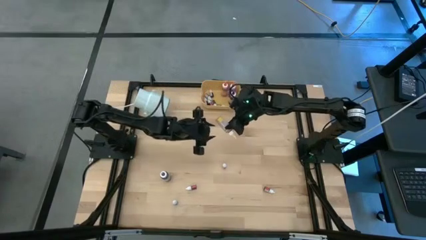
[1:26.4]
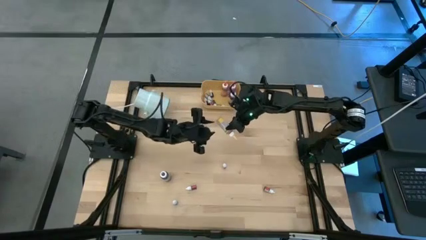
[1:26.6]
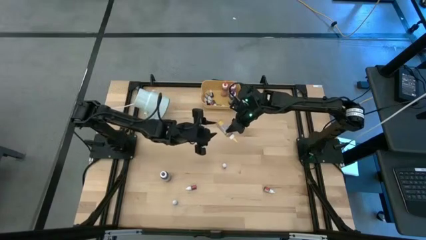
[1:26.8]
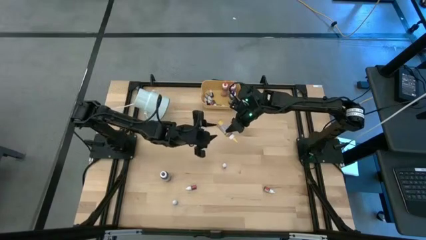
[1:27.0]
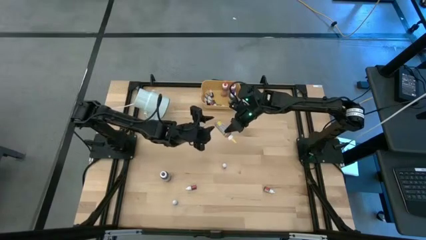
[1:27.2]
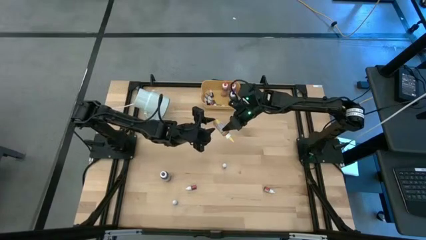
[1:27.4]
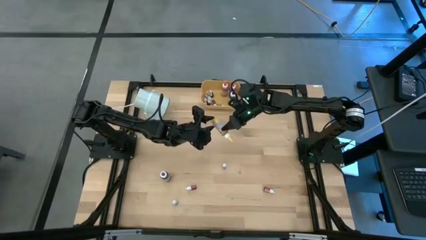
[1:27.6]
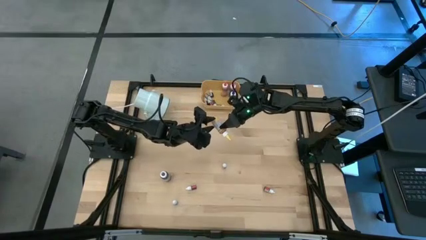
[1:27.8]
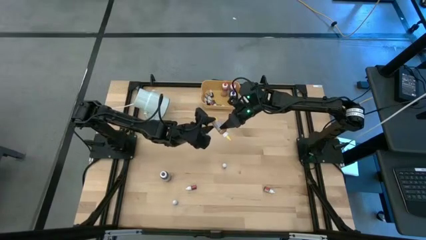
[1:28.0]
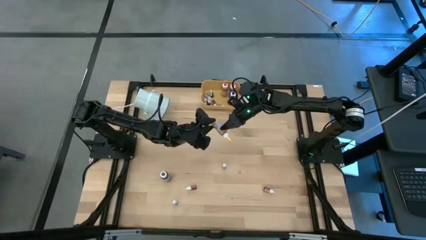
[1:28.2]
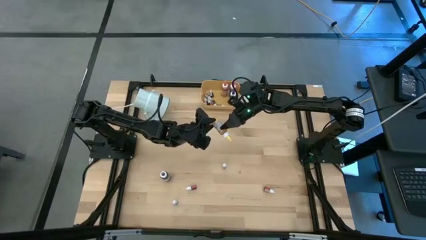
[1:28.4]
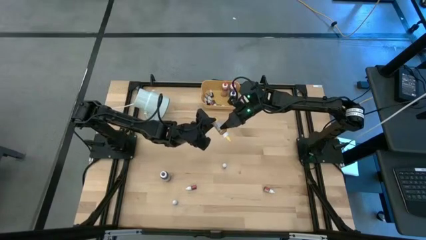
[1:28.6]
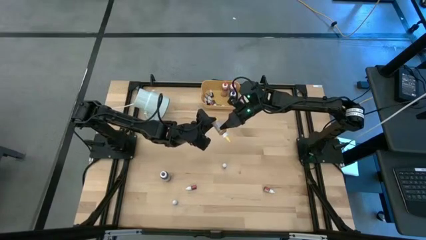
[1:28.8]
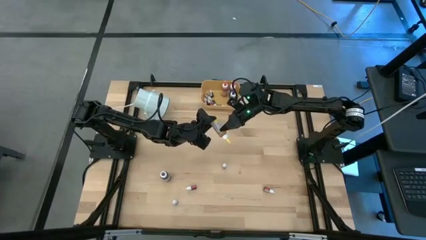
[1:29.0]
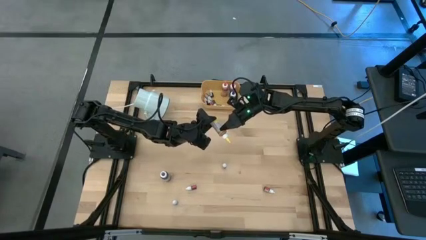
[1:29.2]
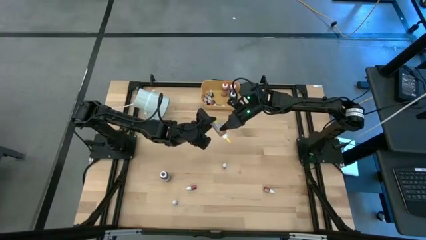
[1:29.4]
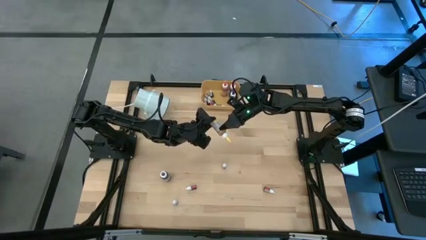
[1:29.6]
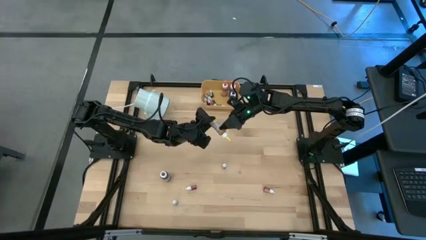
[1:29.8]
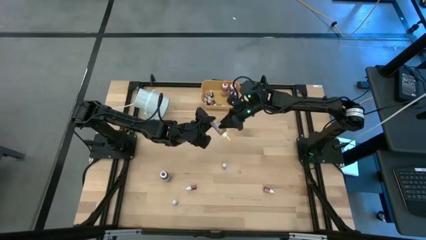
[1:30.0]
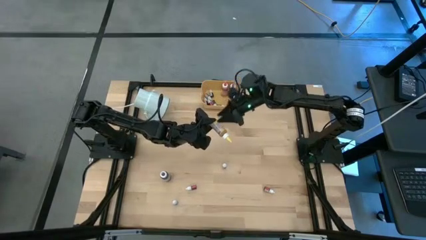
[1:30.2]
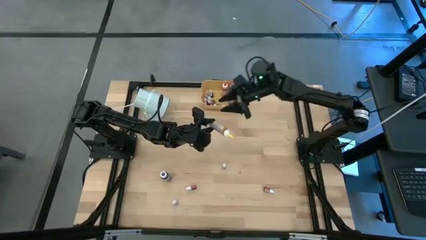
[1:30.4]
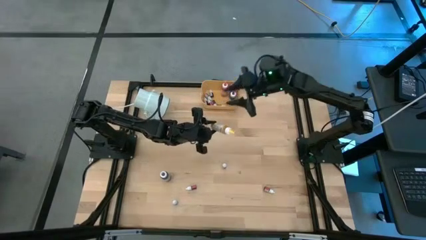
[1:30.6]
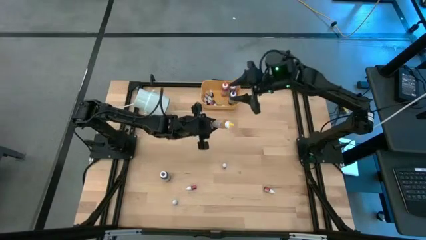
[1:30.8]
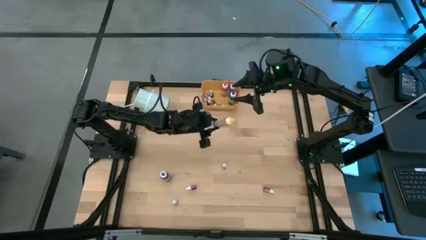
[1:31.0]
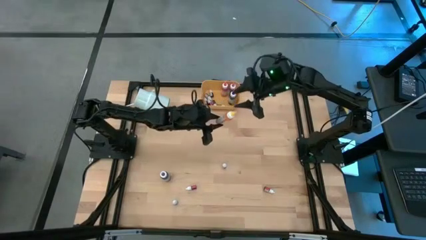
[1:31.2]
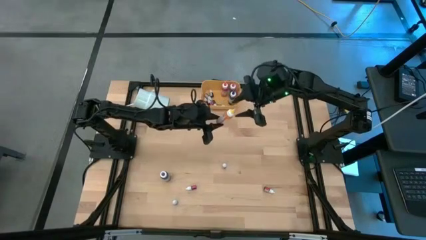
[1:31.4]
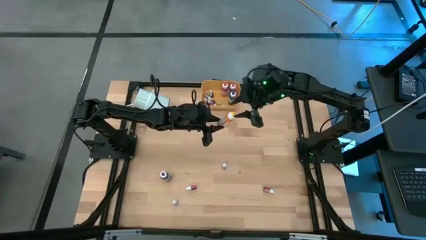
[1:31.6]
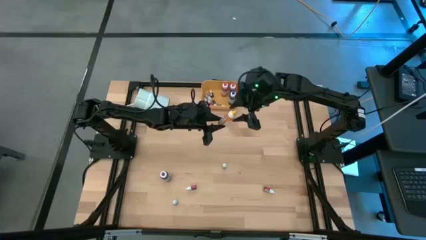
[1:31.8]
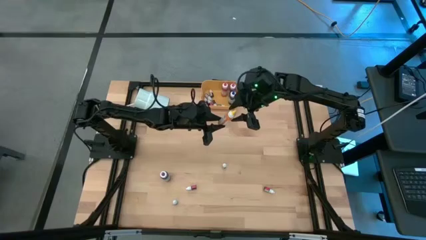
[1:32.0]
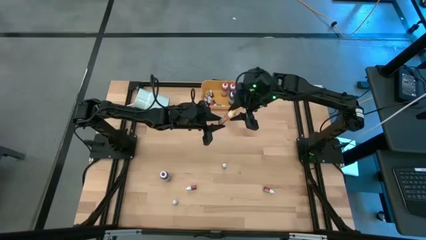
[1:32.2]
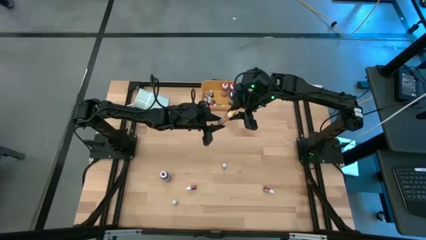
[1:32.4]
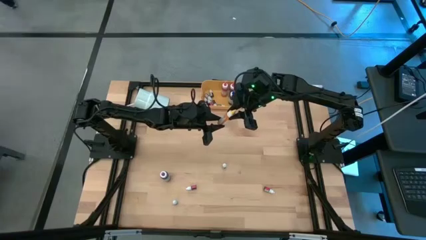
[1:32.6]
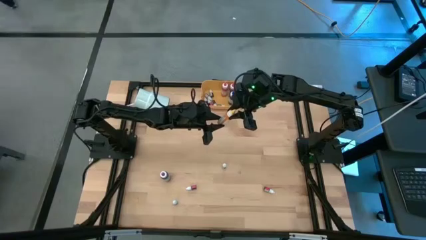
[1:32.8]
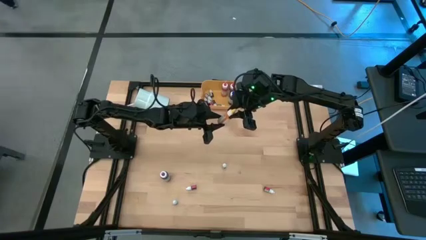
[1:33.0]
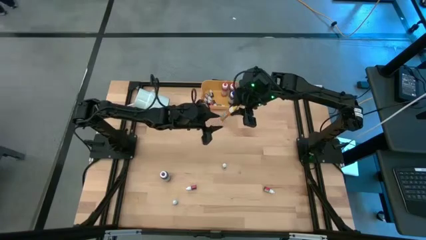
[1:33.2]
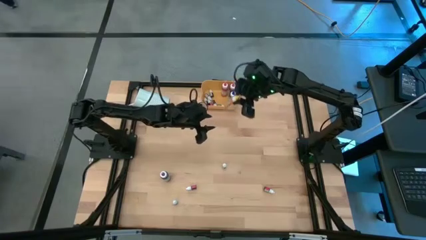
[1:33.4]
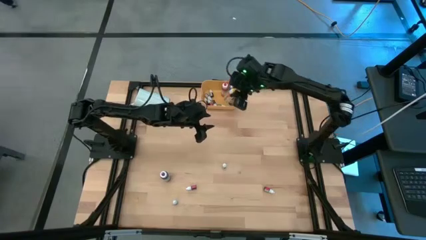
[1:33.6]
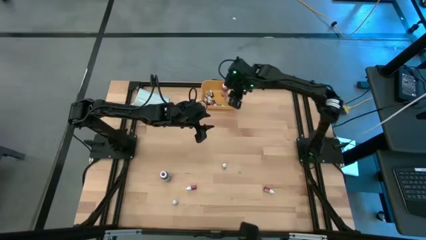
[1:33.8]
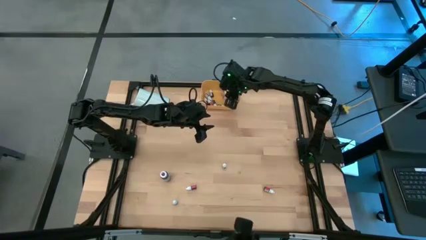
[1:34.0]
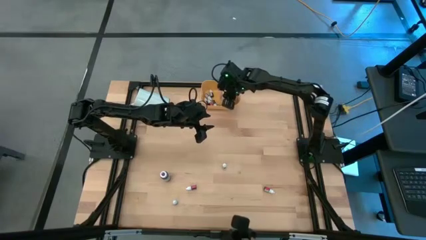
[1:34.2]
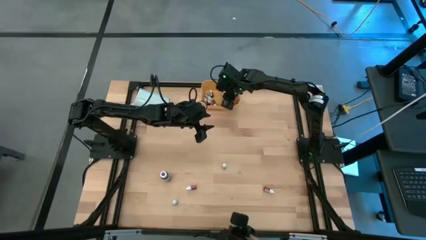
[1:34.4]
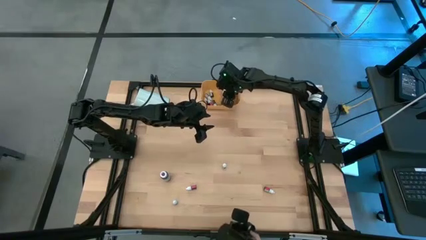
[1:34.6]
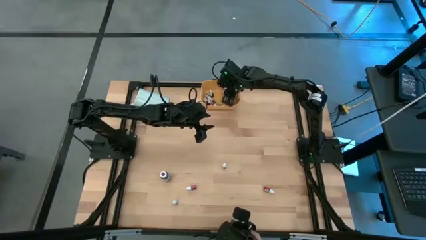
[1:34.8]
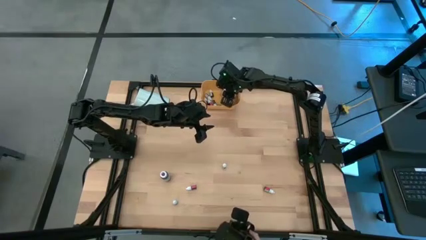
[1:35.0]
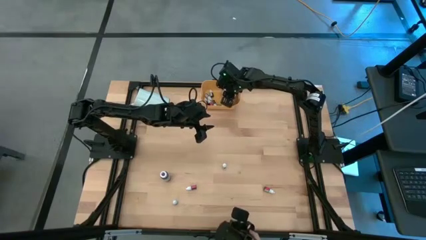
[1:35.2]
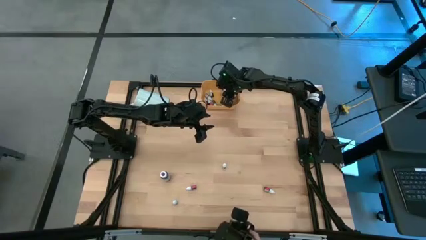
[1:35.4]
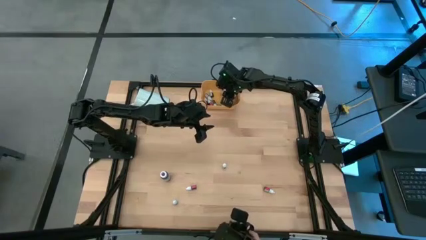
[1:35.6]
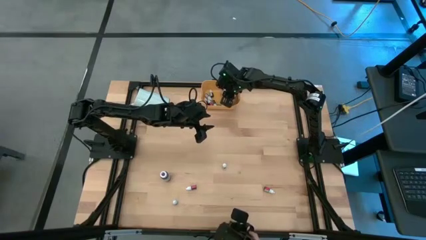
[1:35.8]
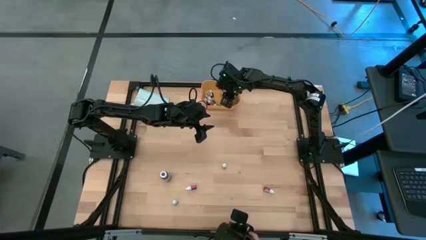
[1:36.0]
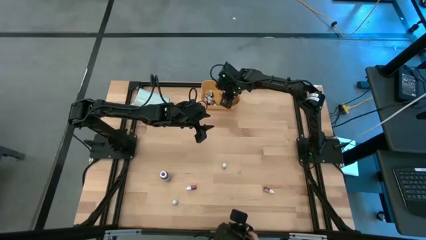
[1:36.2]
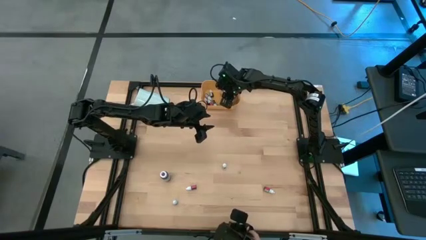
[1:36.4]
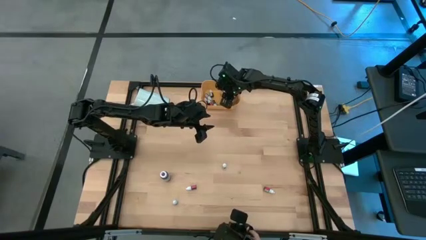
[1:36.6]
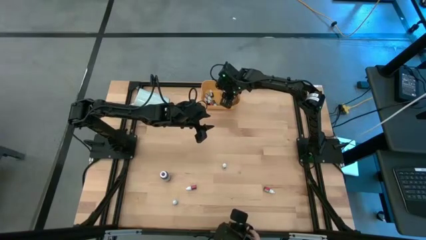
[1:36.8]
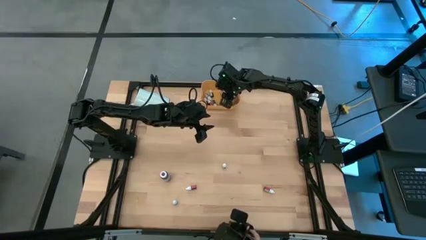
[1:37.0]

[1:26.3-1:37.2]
Task: Pick & Place food coloring
Put the yellow food coloring bottle into the yellow bin

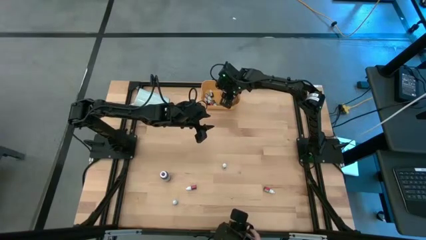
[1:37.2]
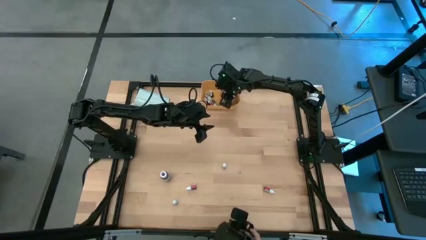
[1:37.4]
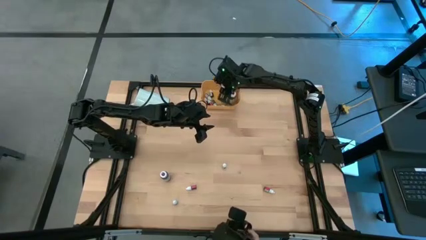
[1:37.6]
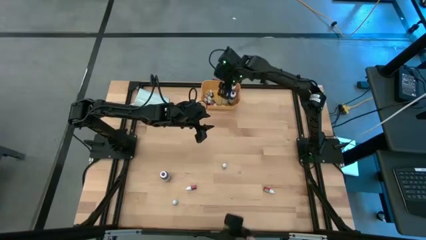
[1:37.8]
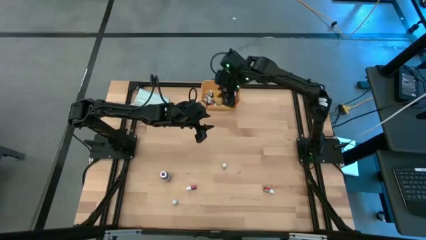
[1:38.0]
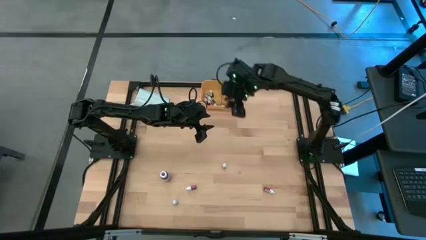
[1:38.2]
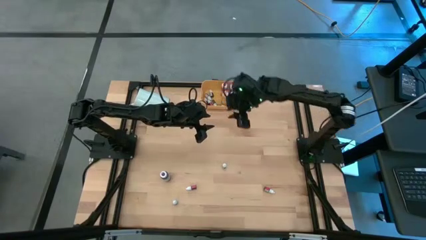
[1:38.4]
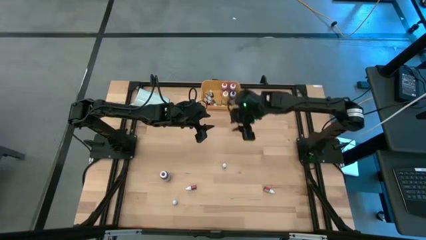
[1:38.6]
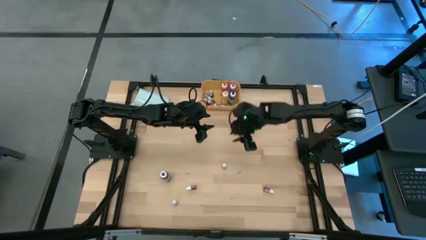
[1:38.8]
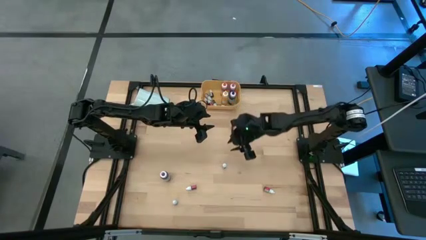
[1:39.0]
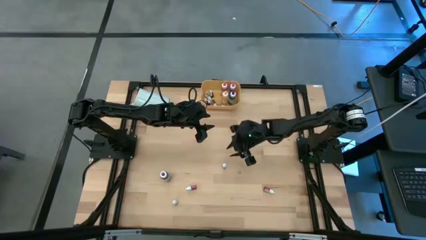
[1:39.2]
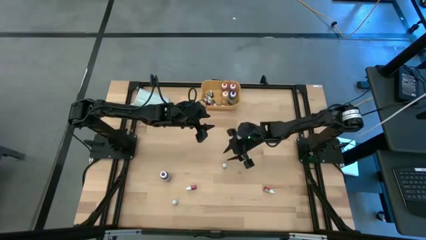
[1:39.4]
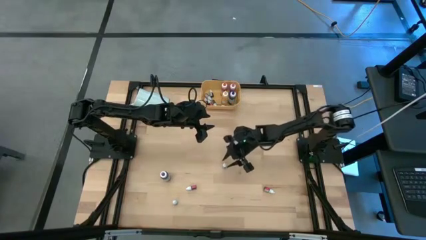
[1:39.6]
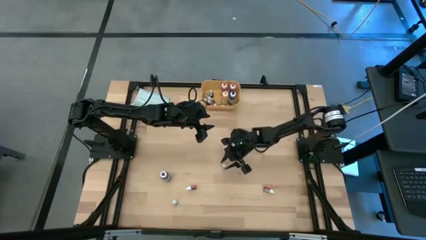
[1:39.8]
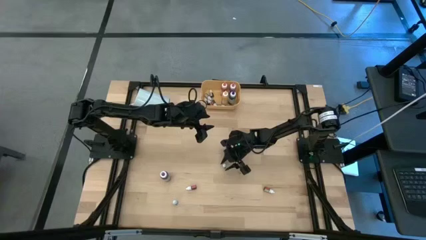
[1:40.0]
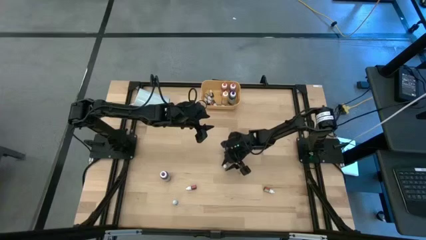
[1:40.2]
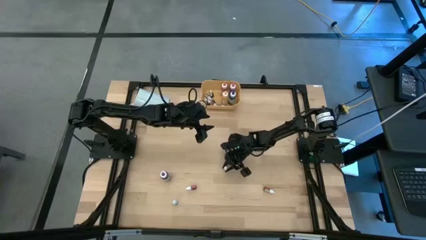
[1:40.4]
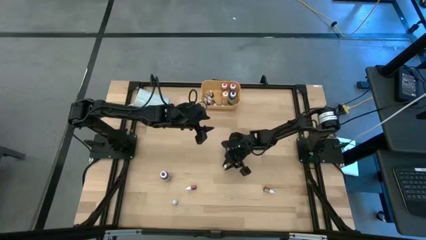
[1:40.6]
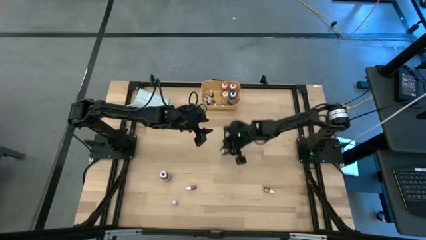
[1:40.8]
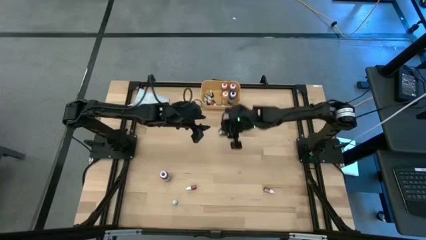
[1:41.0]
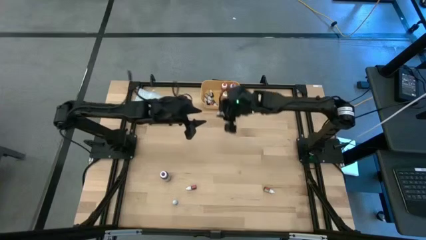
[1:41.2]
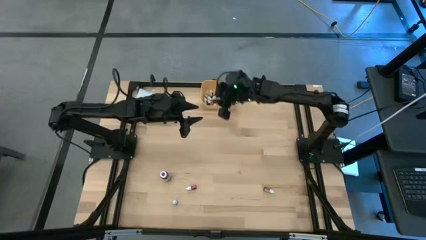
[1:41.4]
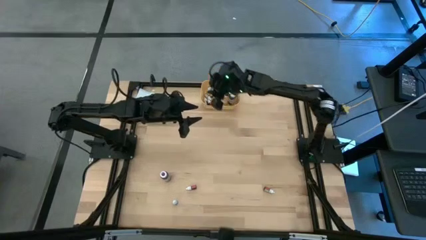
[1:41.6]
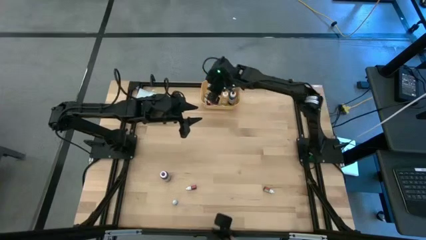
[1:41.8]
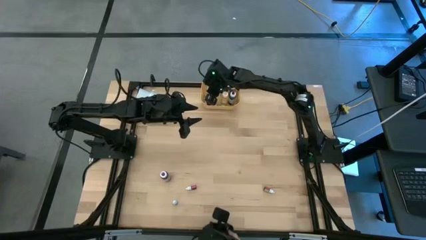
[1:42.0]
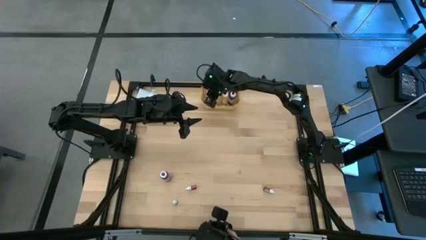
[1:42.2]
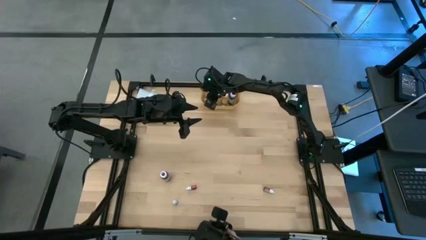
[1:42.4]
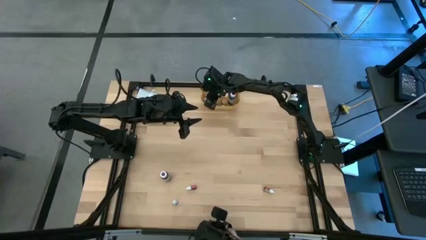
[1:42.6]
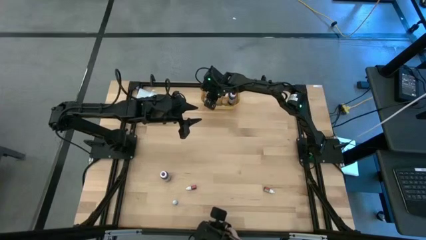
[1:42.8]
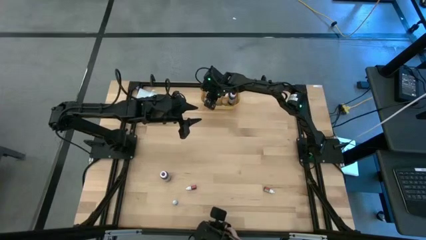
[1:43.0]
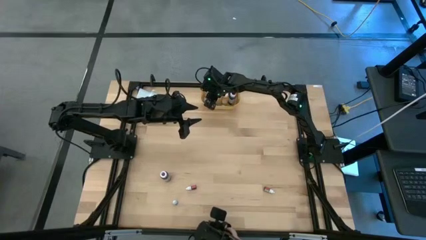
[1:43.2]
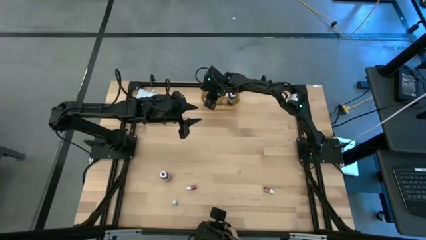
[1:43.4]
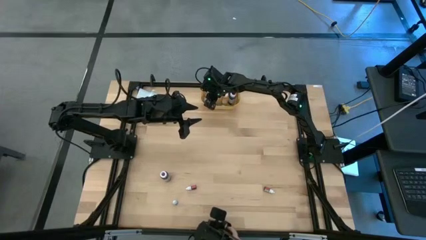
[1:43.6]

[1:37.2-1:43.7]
Put the black food coloring bottle into the yellow bin
